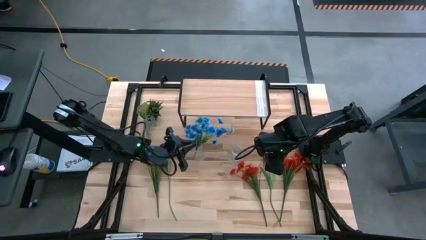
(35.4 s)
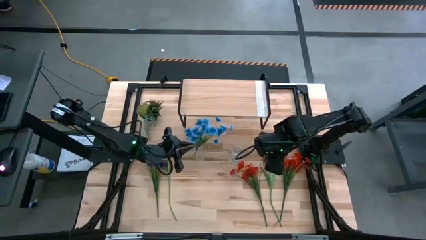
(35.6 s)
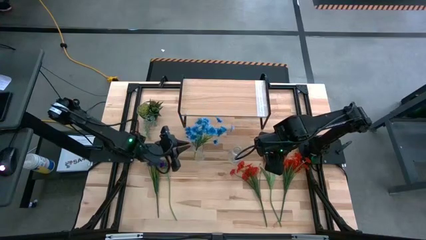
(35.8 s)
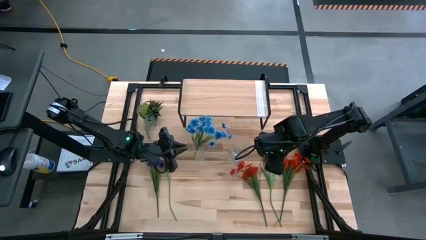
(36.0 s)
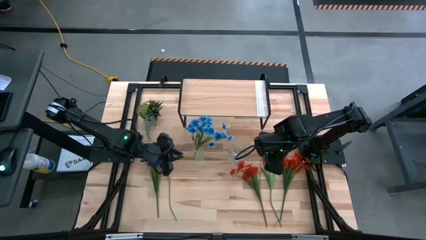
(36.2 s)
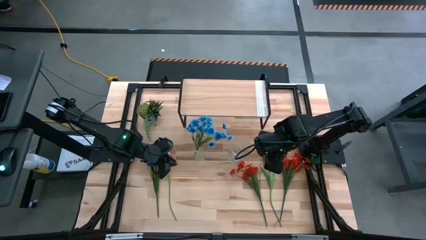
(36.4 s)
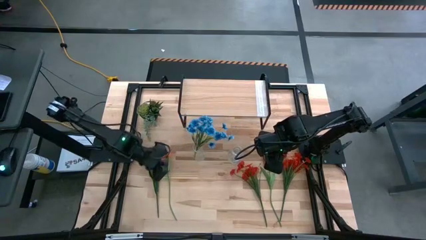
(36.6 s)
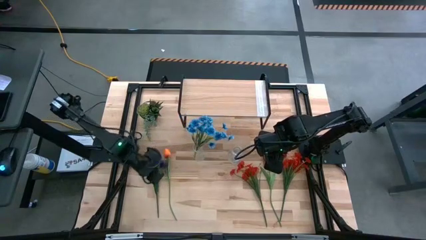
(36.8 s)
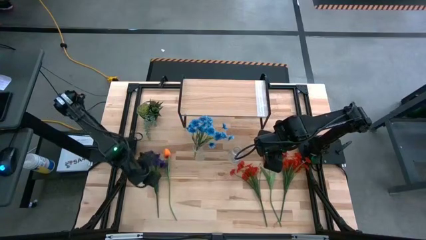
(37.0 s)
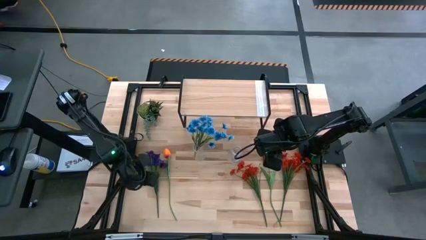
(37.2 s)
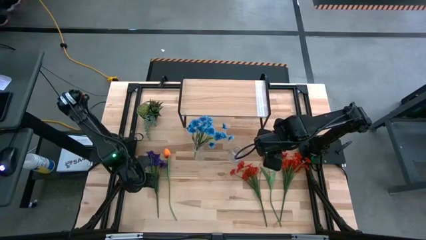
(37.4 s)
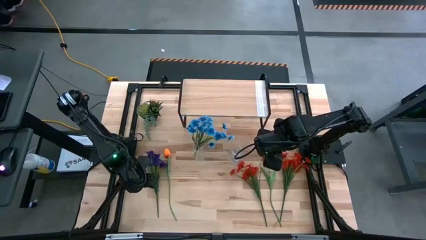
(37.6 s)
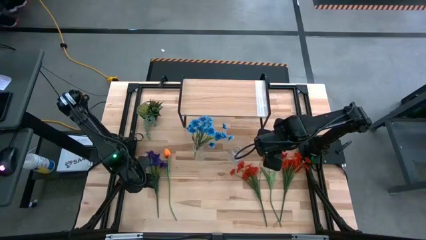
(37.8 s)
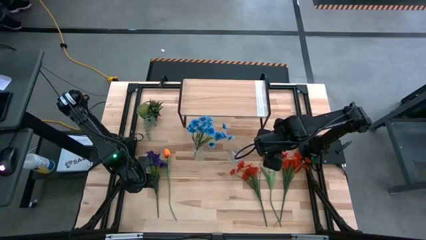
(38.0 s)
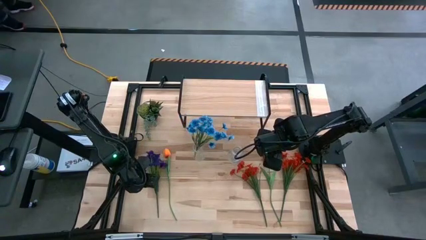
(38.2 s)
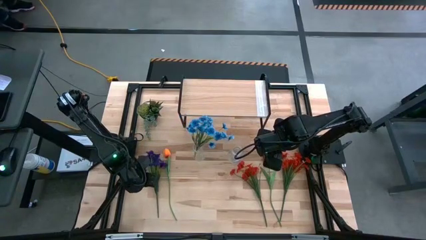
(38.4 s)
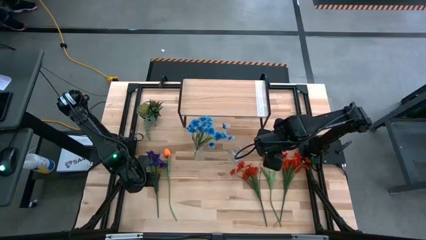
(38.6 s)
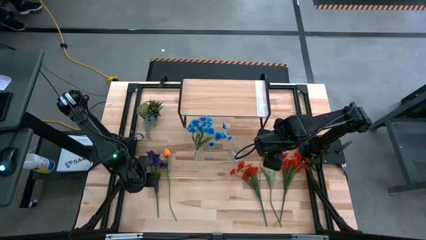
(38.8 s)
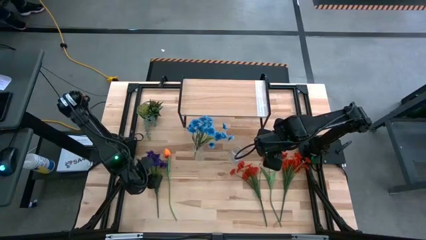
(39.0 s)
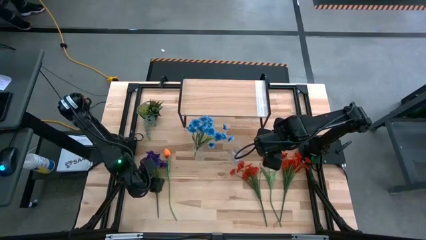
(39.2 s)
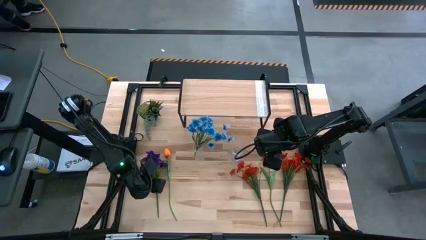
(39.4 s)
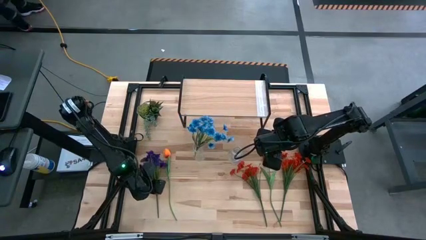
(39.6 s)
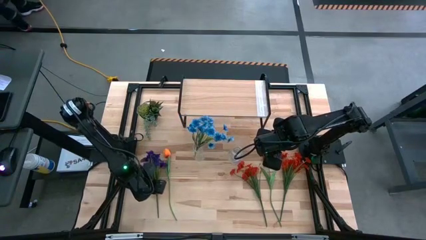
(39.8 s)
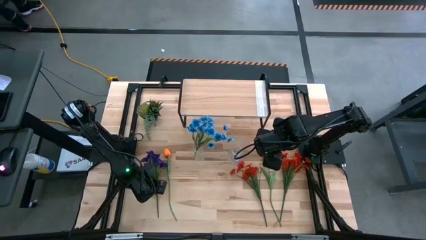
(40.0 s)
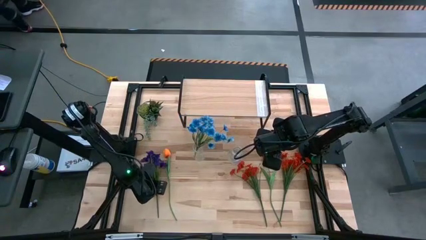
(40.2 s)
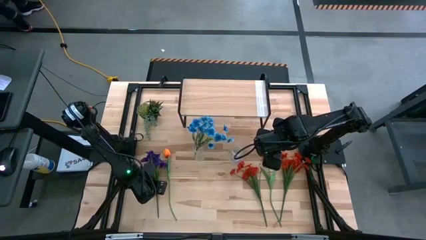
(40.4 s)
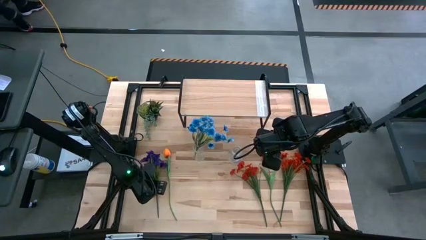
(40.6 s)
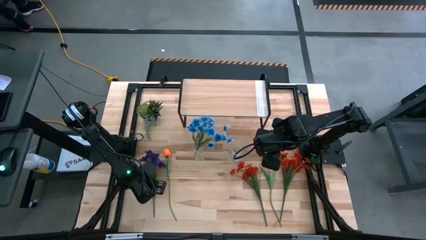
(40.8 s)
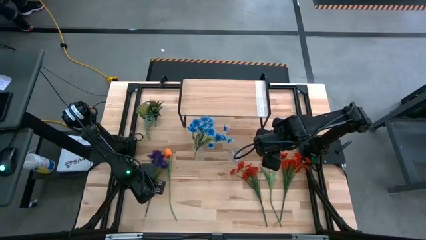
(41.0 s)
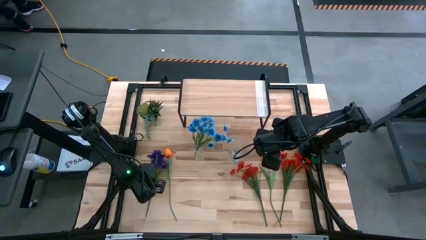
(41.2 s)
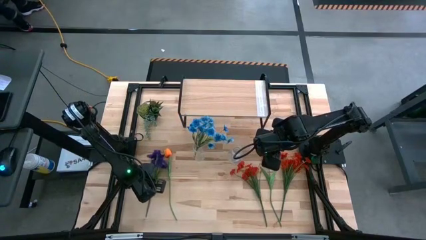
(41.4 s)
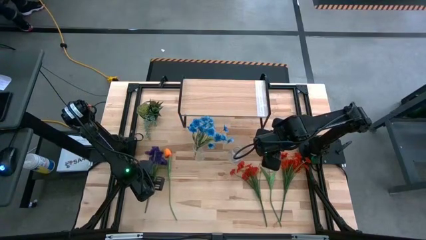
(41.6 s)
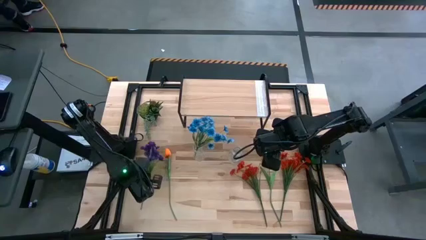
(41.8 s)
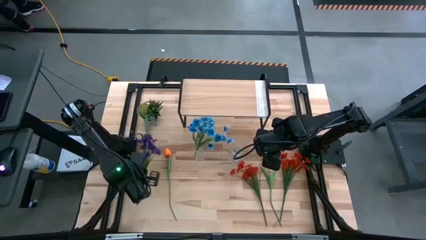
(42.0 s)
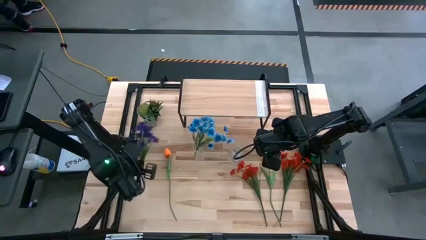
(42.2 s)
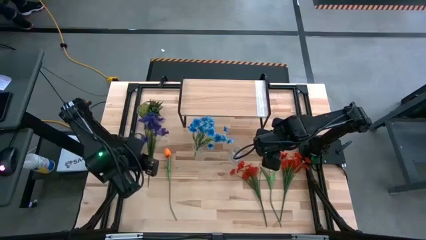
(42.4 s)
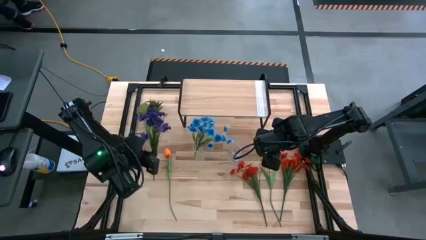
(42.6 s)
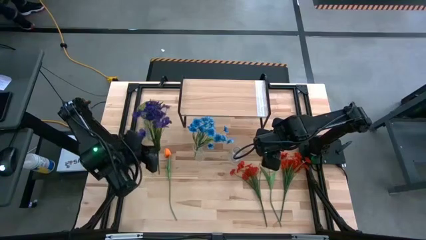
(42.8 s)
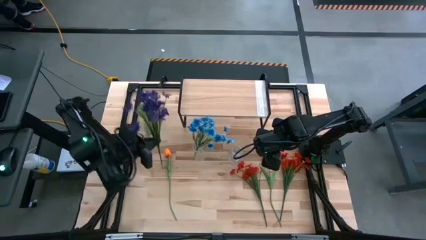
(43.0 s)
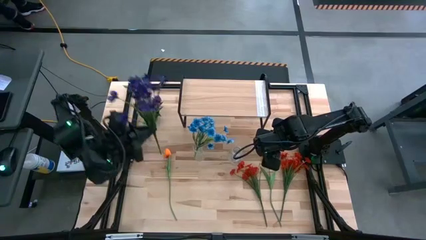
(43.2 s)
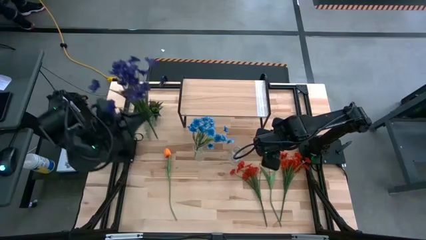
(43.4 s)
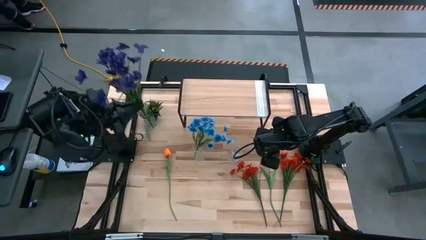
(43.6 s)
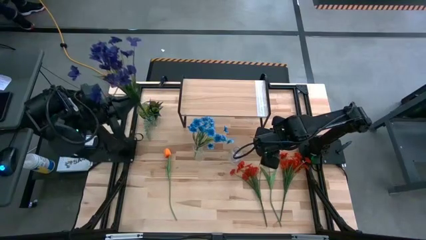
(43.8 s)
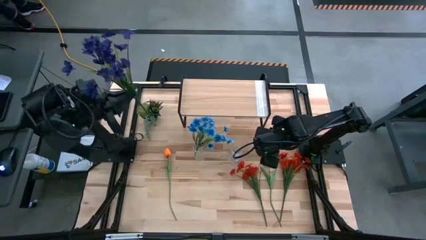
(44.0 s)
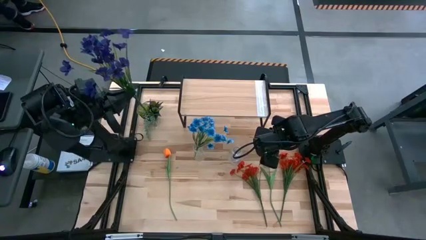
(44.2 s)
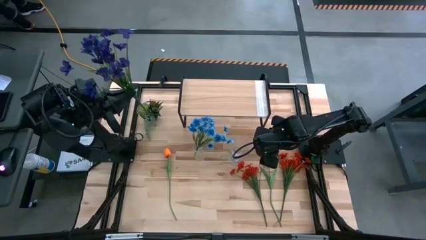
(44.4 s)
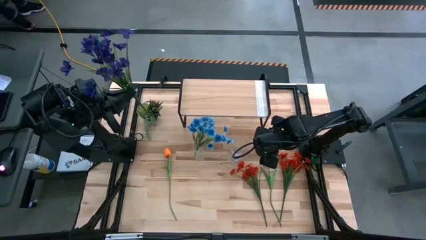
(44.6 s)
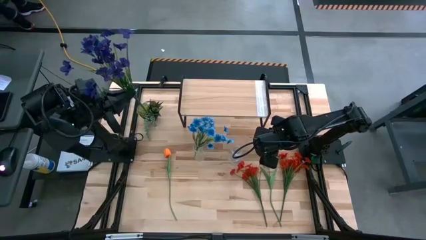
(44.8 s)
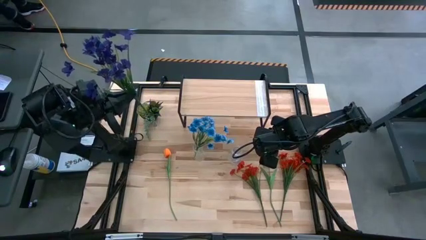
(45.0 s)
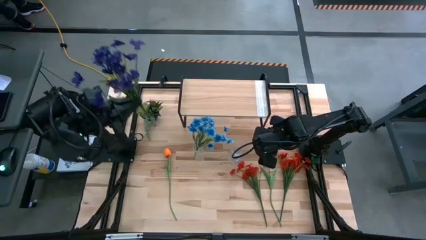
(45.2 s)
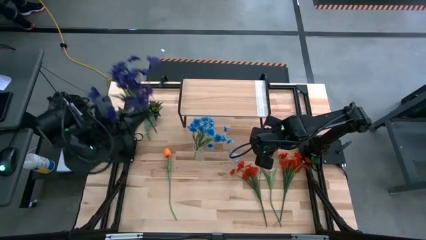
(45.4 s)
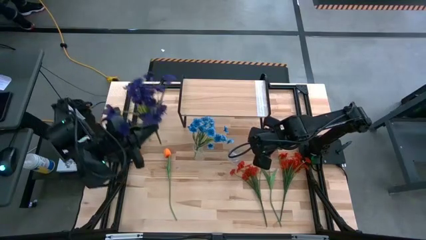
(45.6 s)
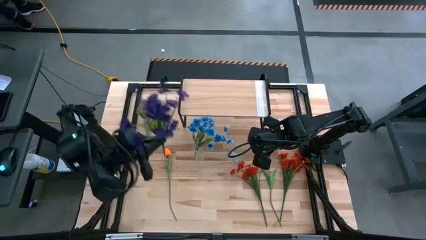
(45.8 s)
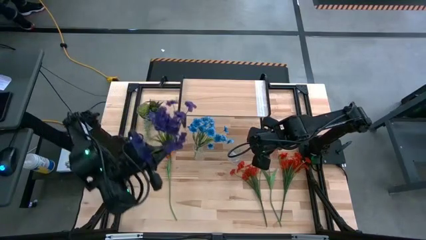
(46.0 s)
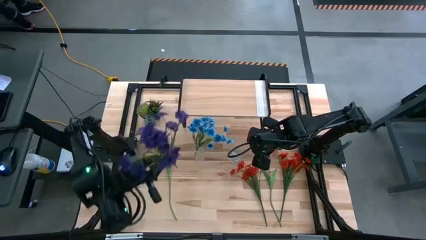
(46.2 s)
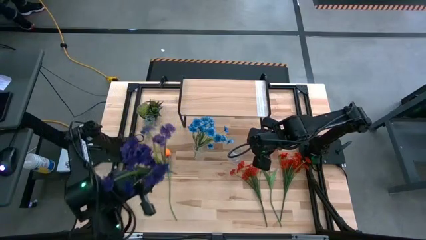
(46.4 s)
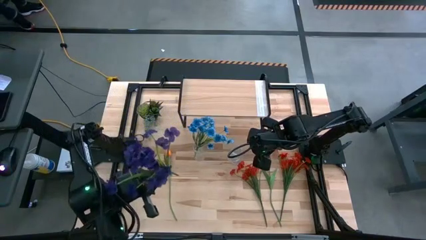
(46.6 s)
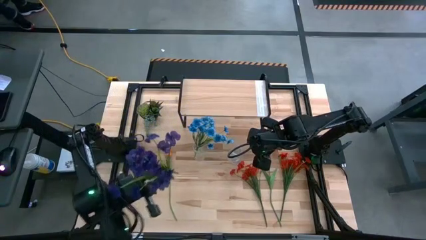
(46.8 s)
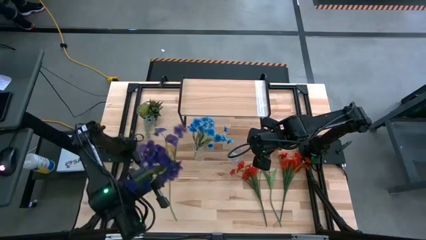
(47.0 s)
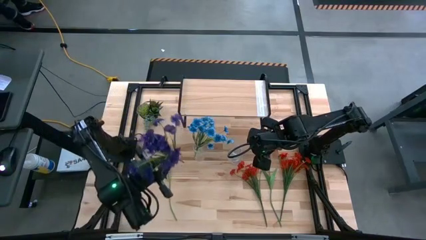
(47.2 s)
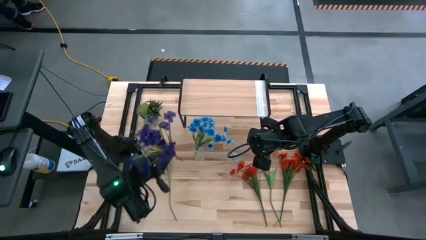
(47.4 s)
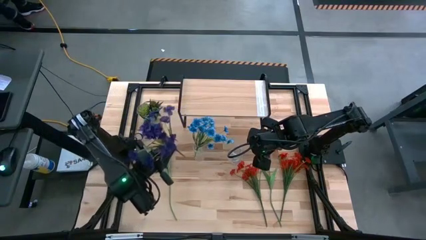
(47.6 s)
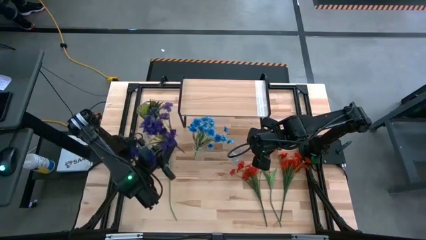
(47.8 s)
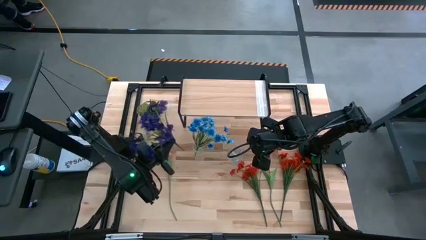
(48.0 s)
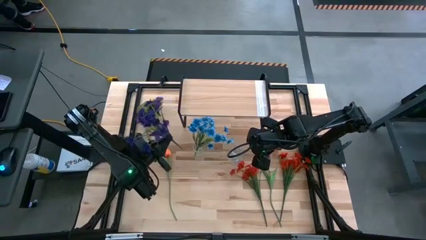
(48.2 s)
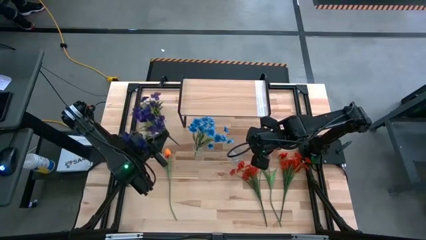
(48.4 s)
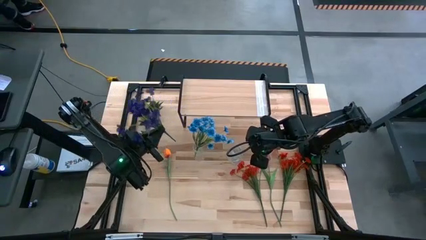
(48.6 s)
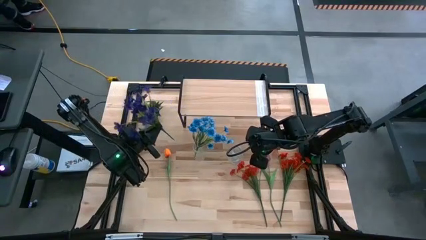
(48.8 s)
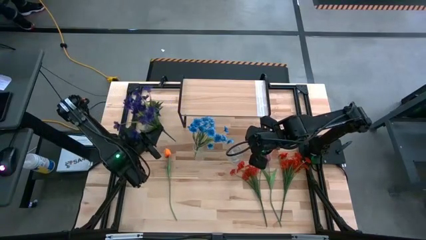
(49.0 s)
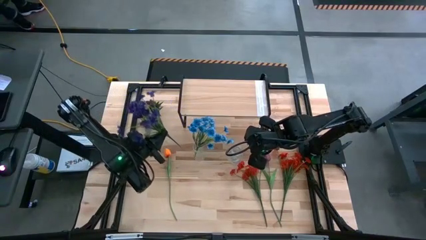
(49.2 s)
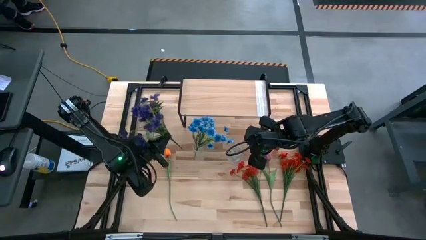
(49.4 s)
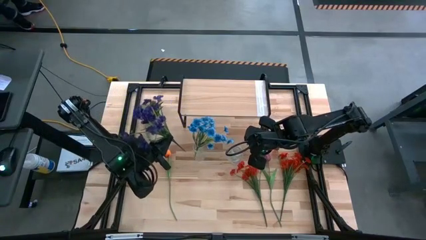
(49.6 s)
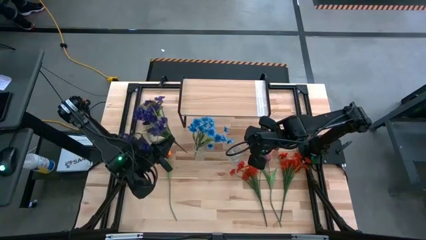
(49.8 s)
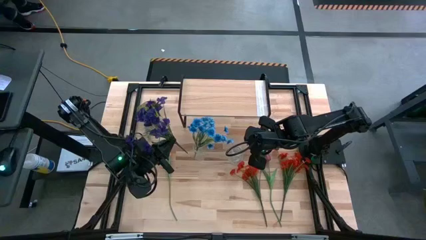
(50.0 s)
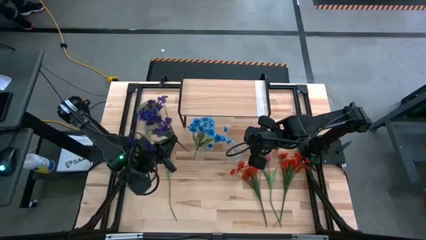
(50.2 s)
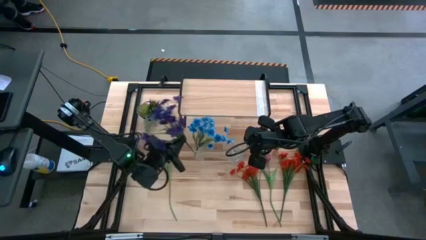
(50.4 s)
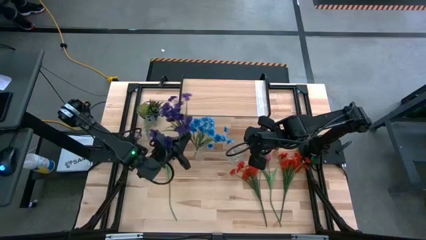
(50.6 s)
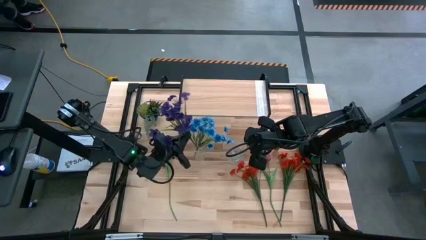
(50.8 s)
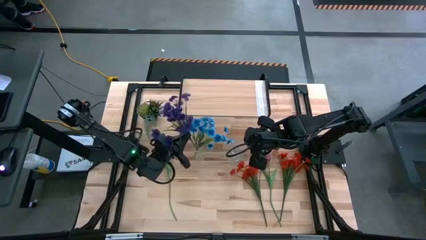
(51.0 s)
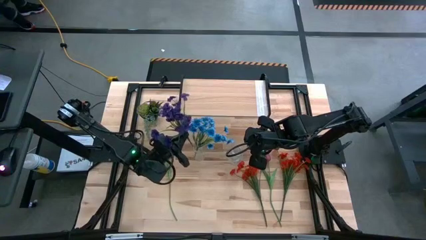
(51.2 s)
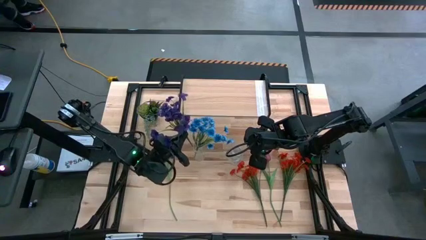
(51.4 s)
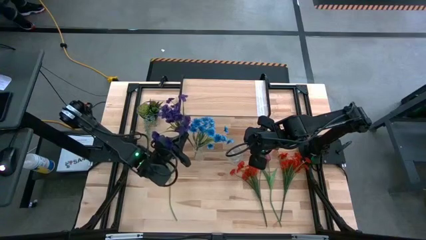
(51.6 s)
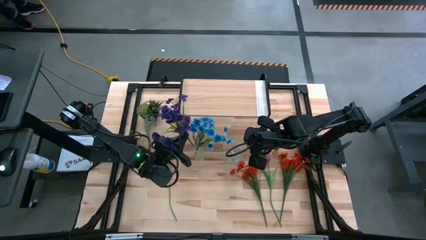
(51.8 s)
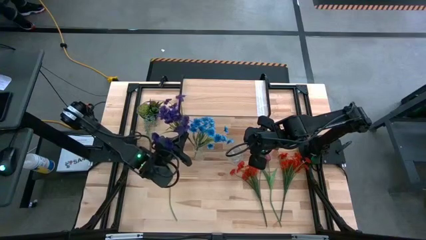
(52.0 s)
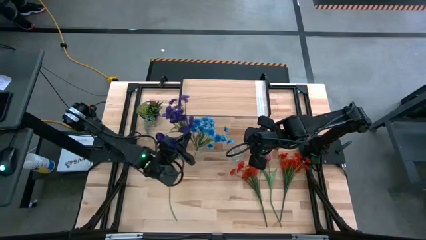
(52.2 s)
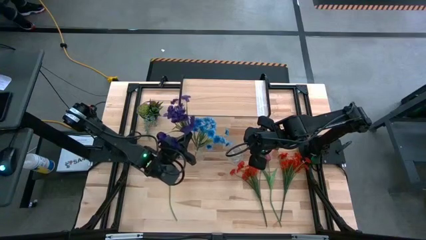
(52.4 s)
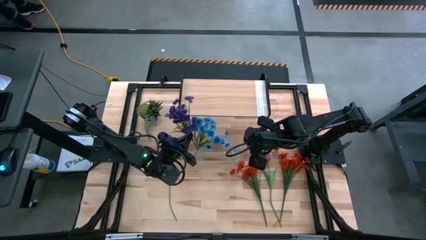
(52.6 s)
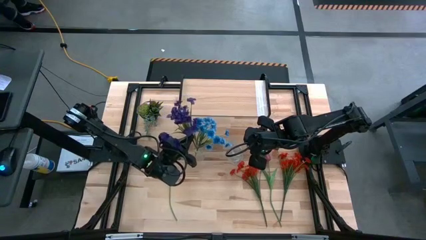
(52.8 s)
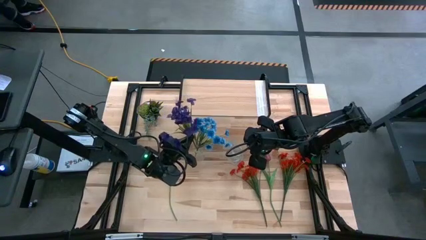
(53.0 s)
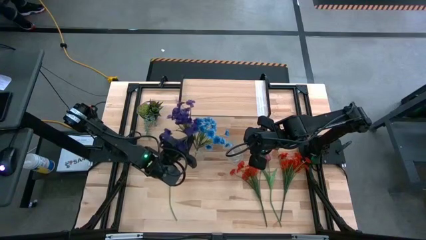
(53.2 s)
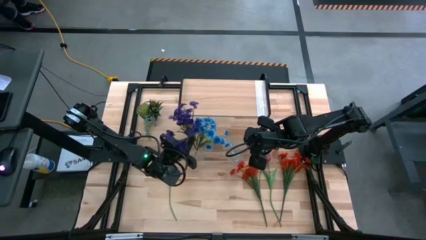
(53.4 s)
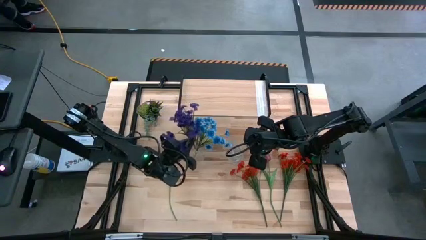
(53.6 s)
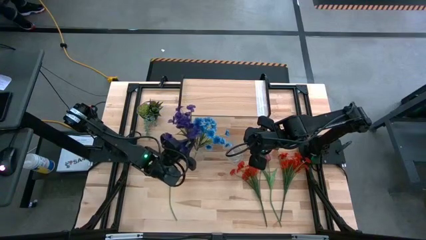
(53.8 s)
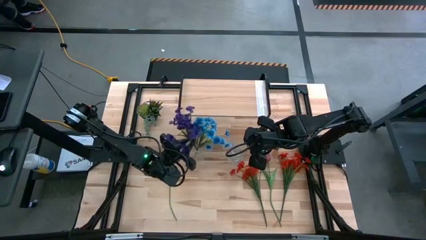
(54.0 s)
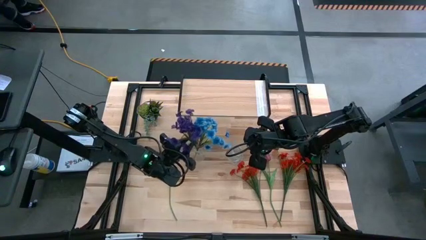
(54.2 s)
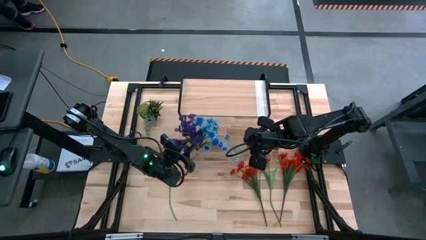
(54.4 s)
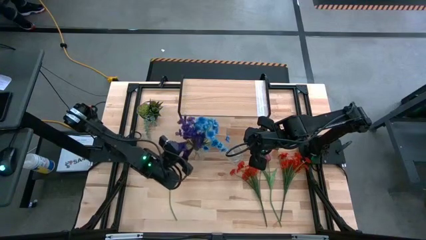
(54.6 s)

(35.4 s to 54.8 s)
Task: Pick and place flowers into a vace then onto a shelf
Put the purple flower into the left transparent crystal vase
